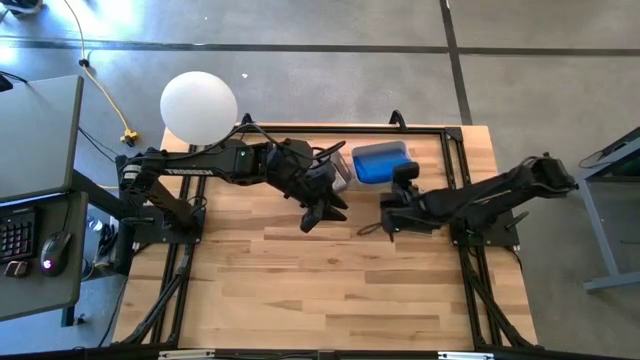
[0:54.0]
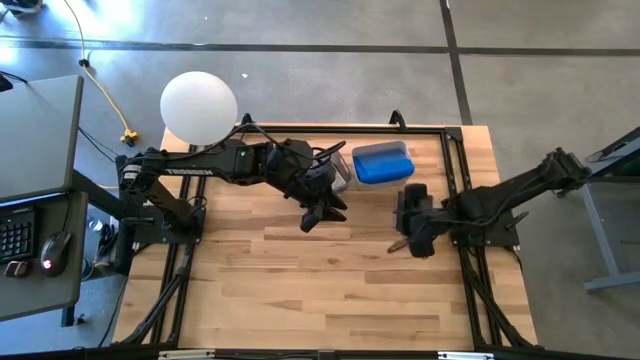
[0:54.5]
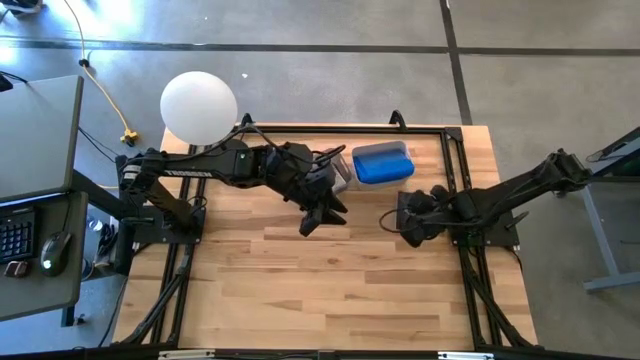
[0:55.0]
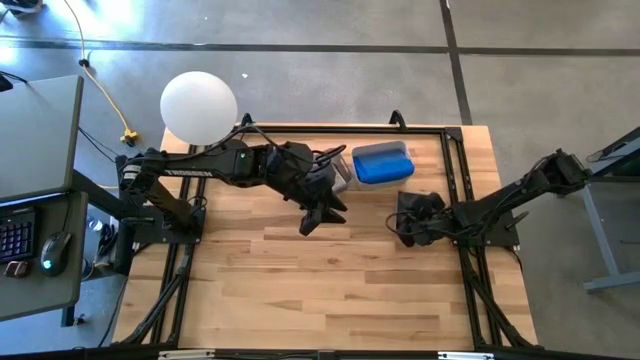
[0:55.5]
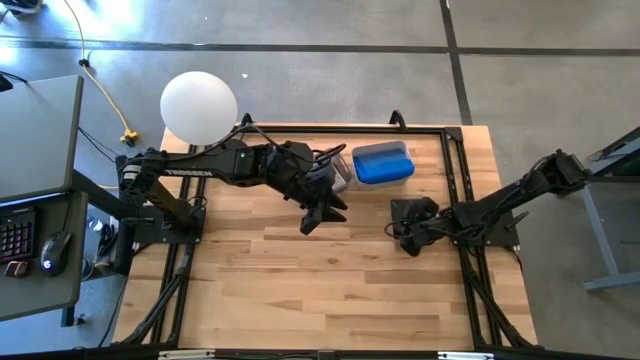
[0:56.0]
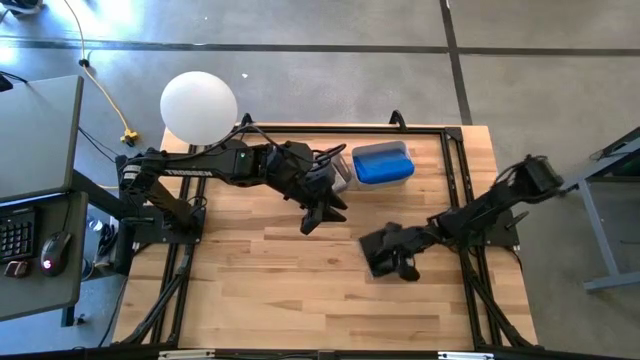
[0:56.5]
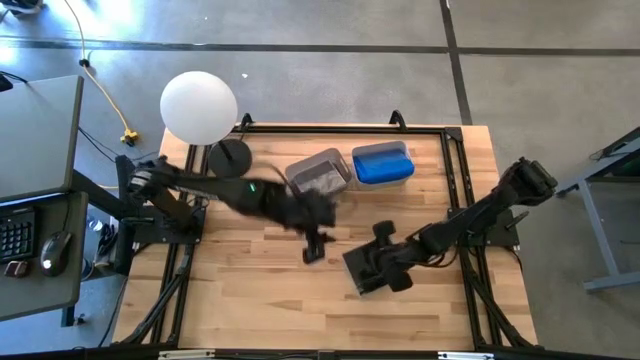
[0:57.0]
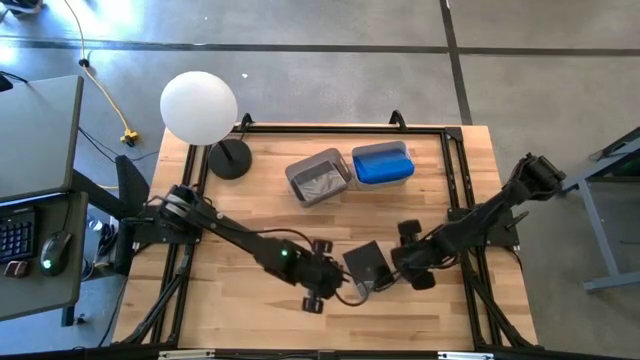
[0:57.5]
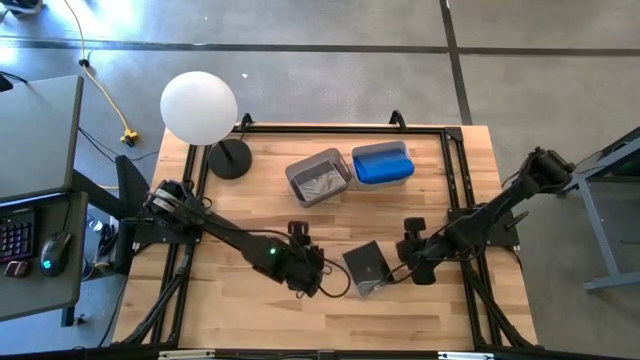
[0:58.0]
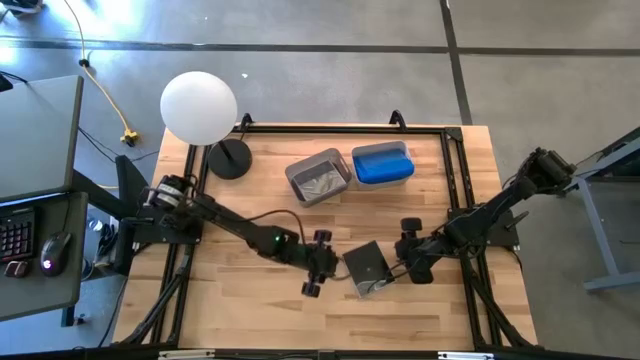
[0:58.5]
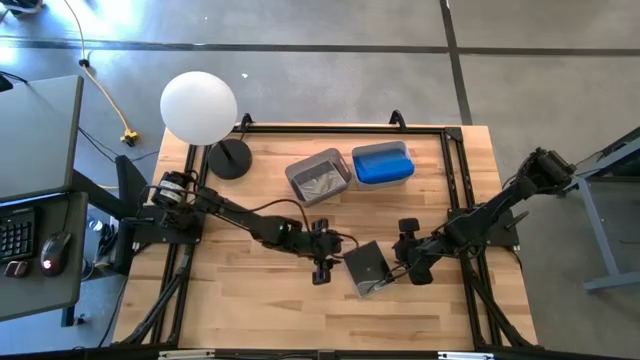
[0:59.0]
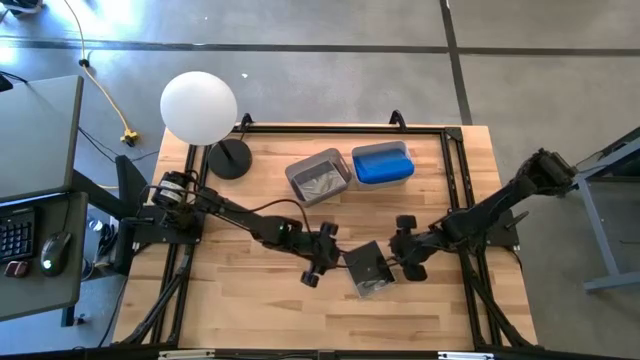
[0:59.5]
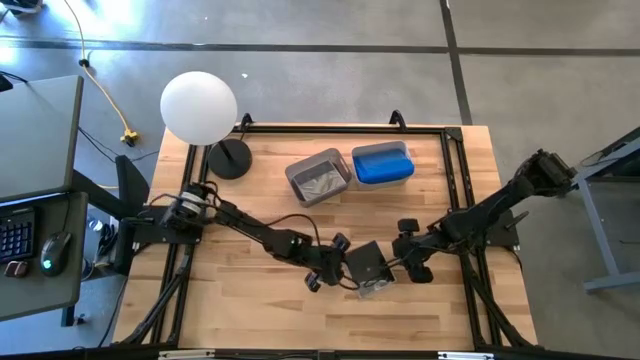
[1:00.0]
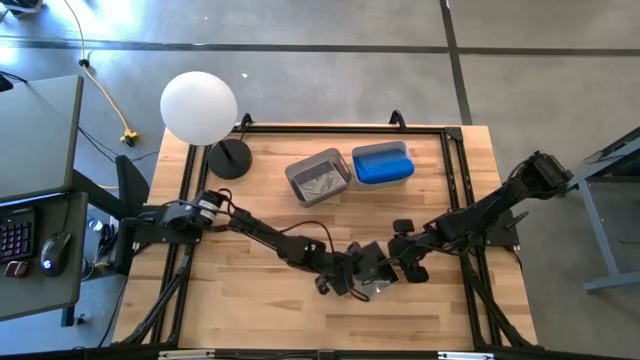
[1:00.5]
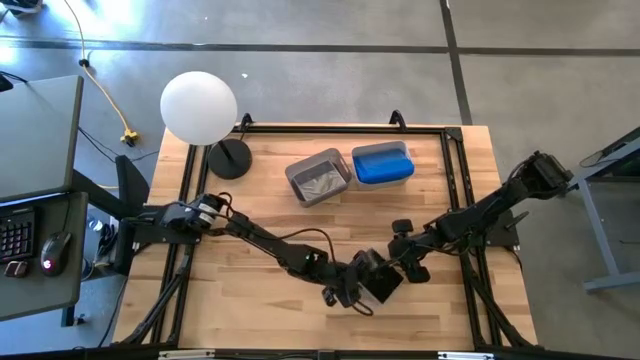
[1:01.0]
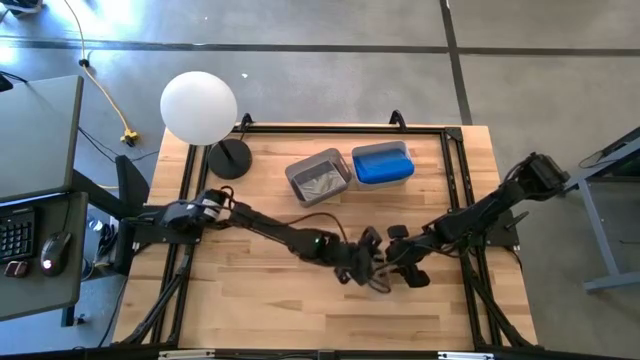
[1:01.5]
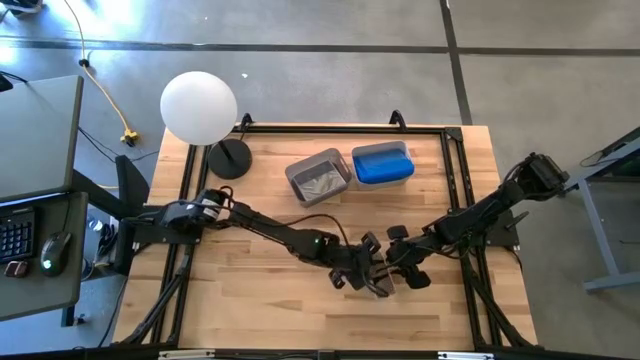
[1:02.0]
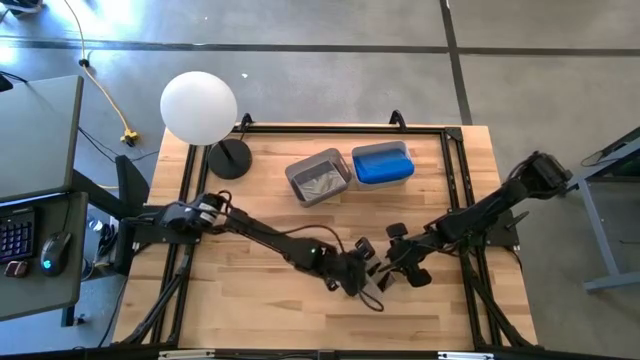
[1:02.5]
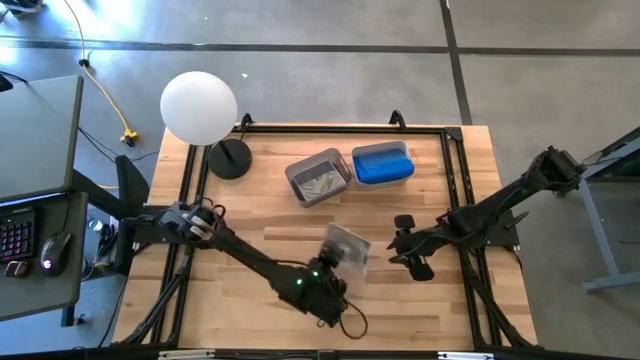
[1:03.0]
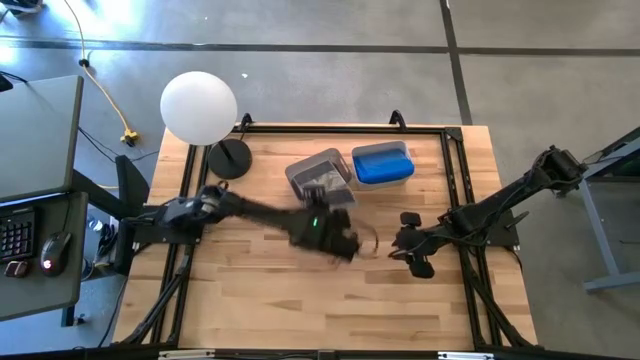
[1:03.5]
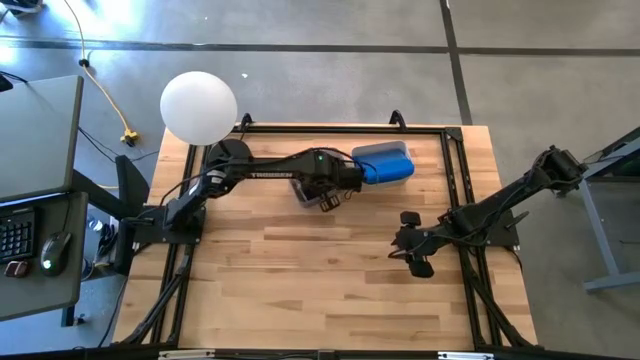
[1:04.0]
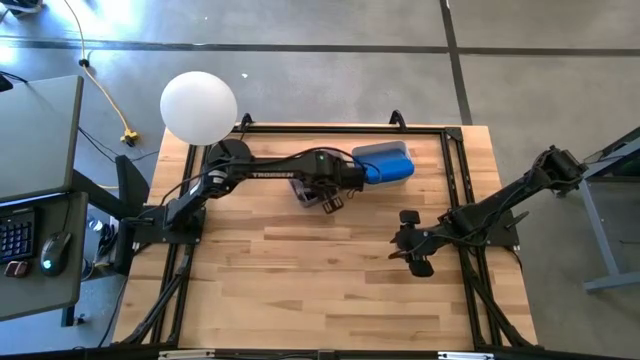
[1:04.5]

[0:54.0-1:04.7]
Task: Pick & place jewel cases by type
Put the black CD case into the black bin

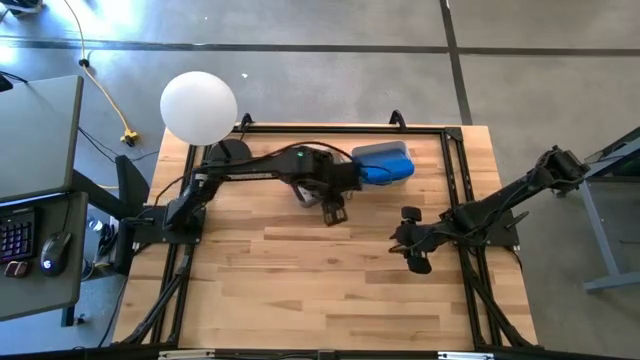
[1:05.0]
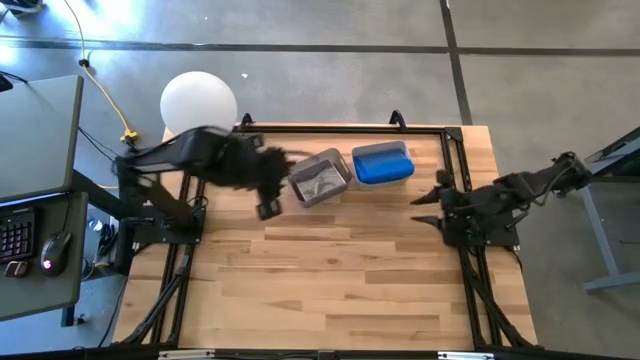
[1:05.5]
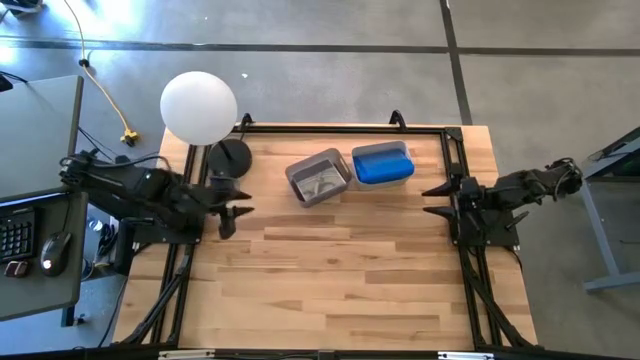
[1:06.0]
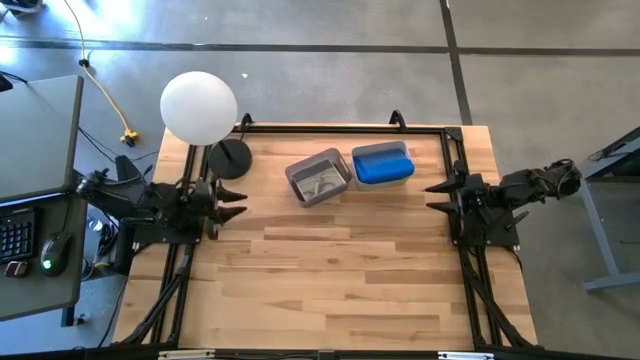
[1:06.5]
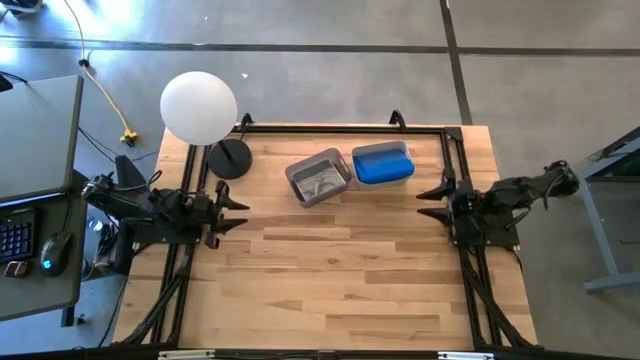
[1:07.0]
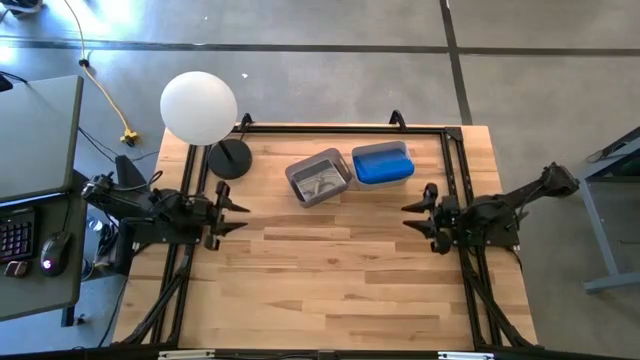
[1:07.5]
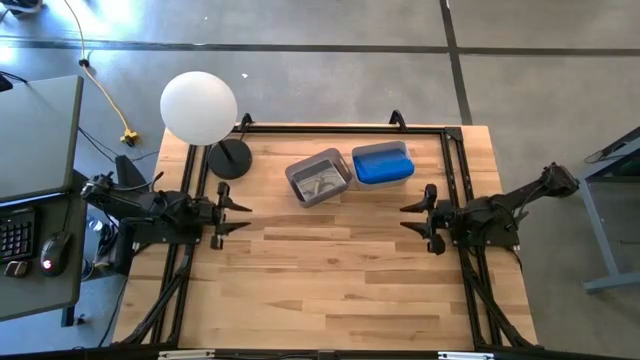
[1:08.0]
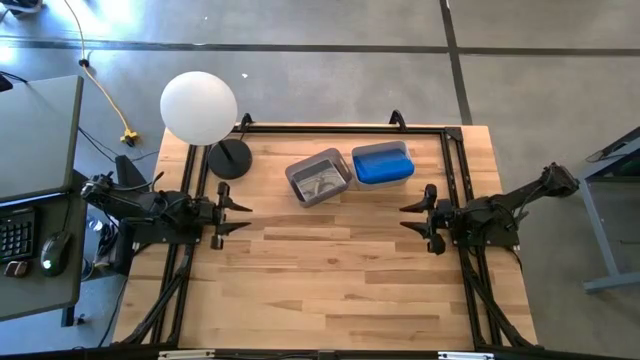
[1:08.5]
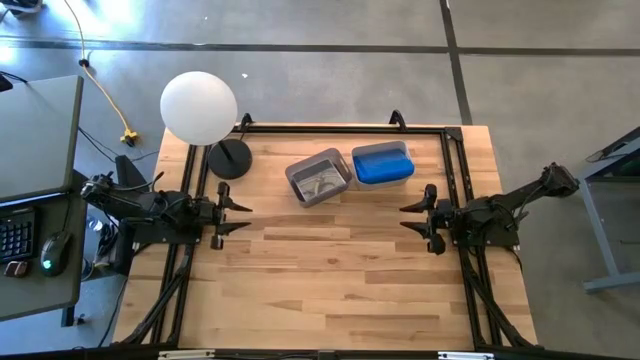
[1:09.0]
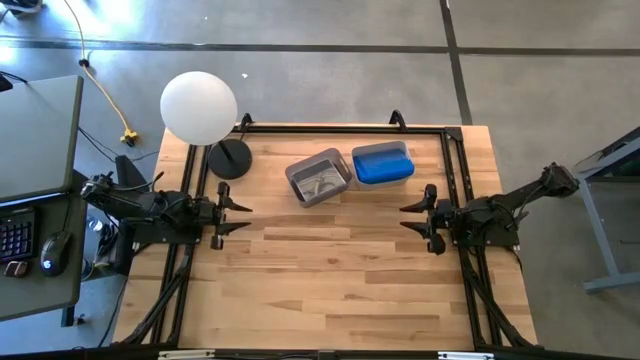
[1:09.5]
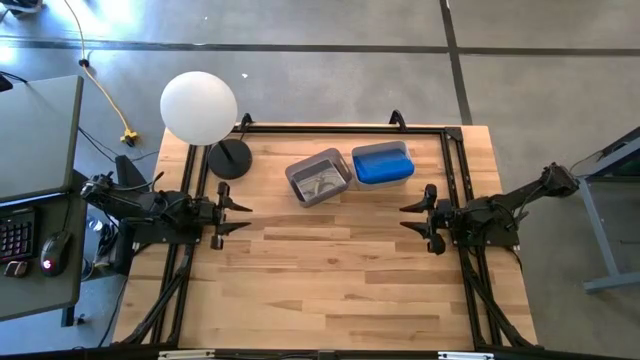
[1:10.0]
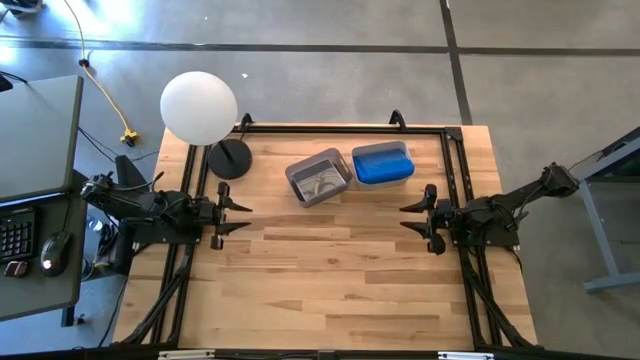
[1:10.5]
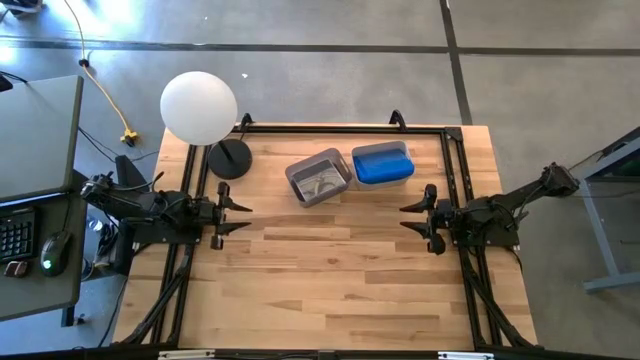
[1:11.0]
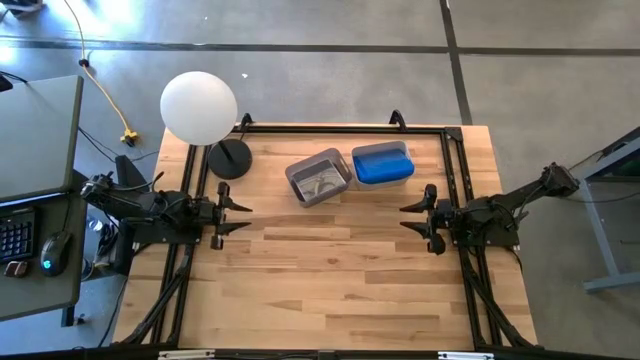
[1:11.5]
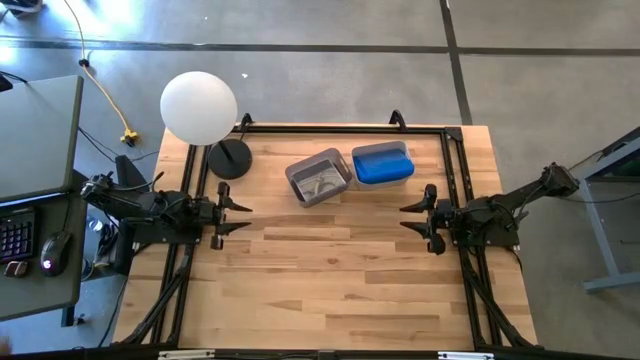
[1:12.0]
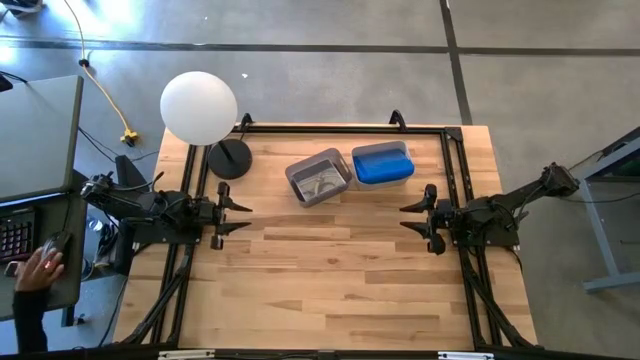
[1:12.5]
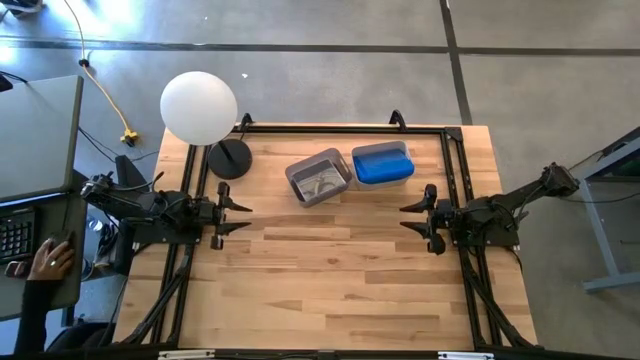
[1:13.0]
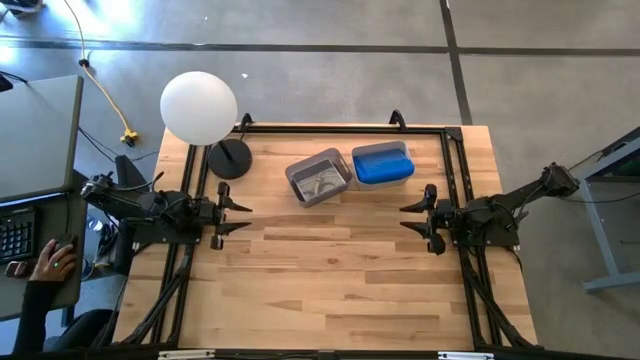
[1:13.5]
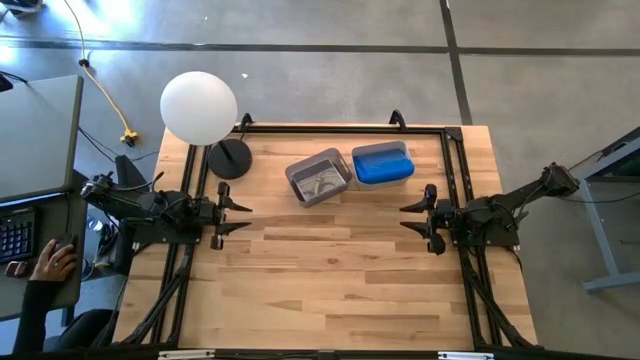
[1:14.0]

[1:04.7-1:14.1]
Return to Home Position

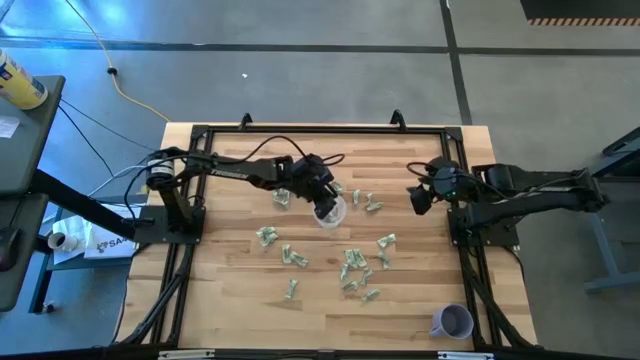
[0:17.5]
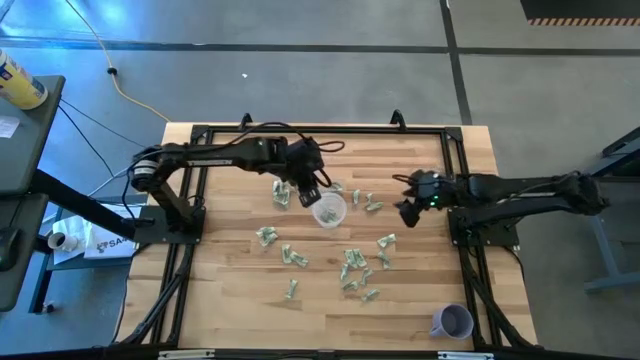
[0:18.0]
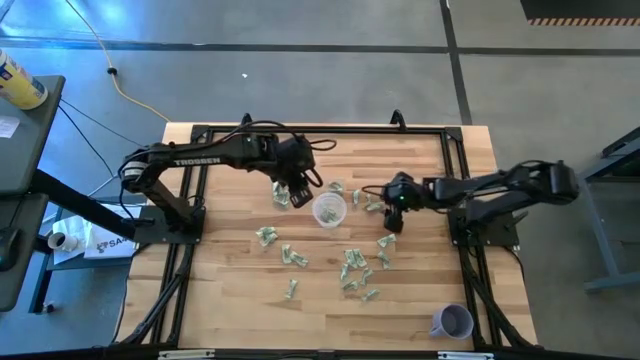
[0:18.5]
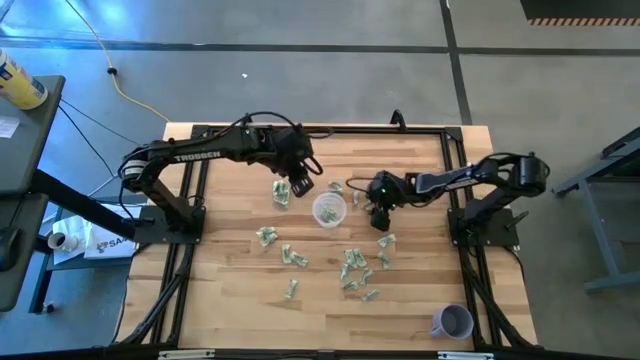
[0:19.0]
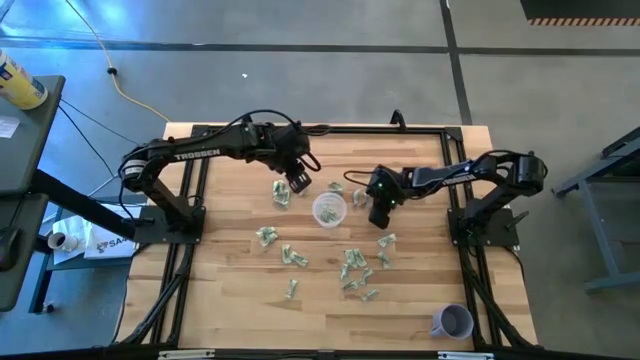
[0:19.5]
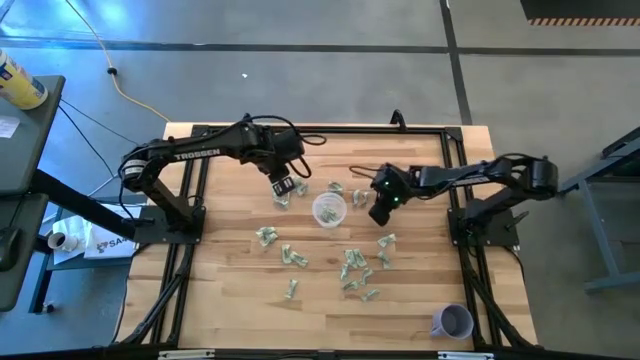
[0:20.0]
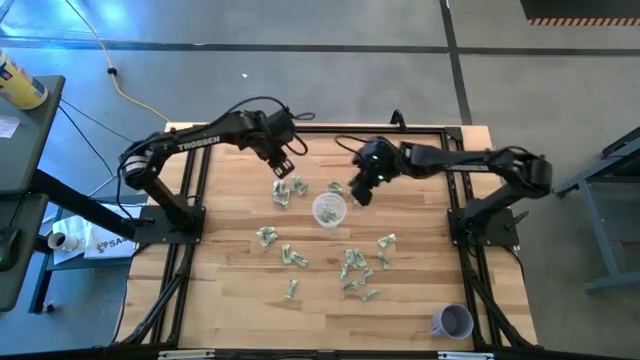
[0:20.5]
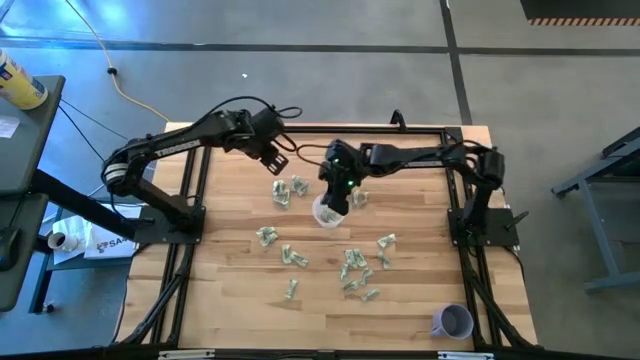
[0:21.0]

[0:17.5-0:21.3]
Task: Pick and place Stevia / Truvia into bins
Put the white stevia packet into the transparent container
